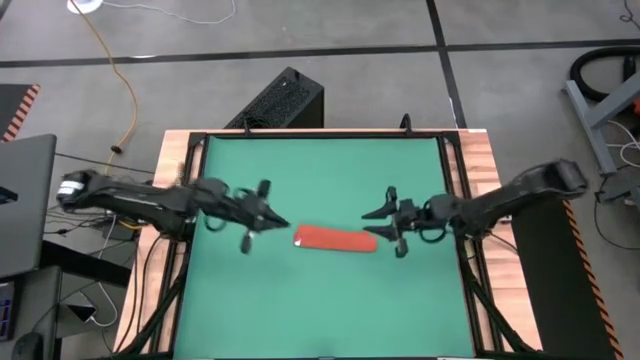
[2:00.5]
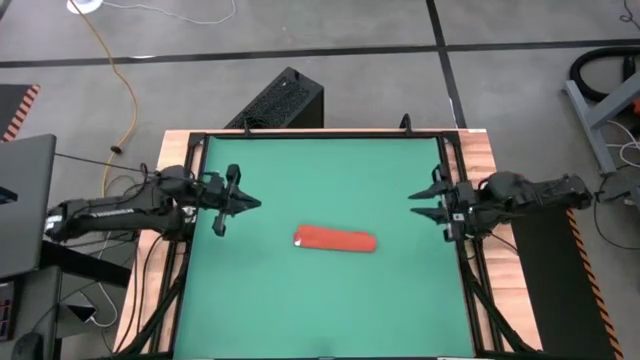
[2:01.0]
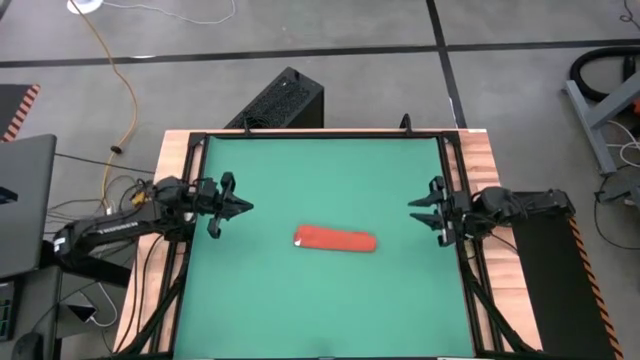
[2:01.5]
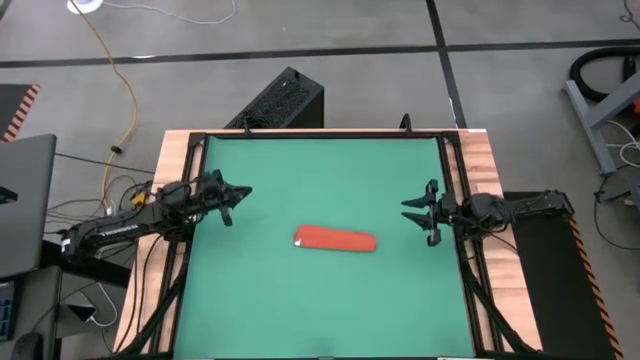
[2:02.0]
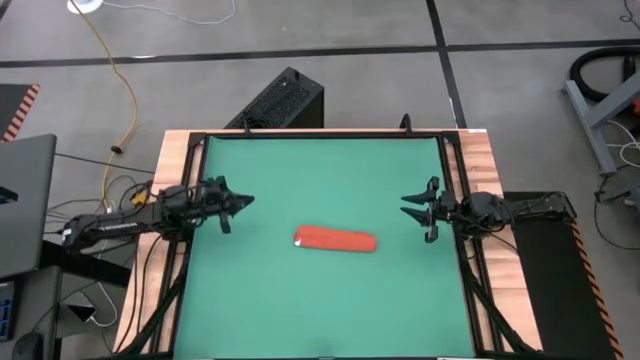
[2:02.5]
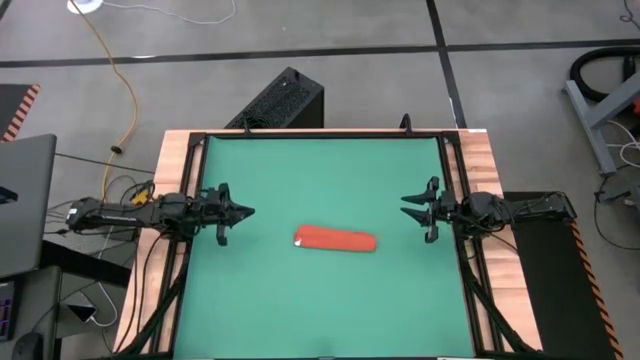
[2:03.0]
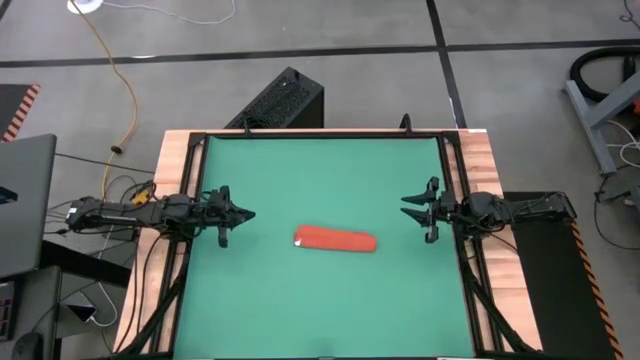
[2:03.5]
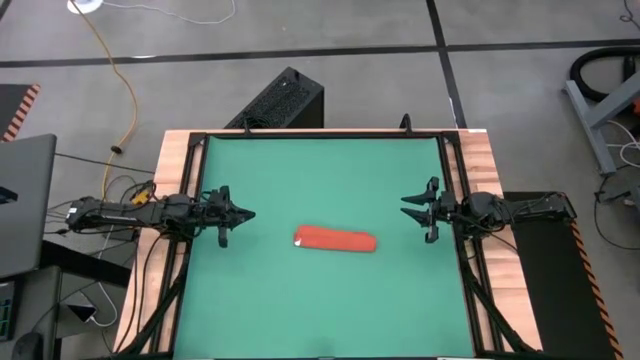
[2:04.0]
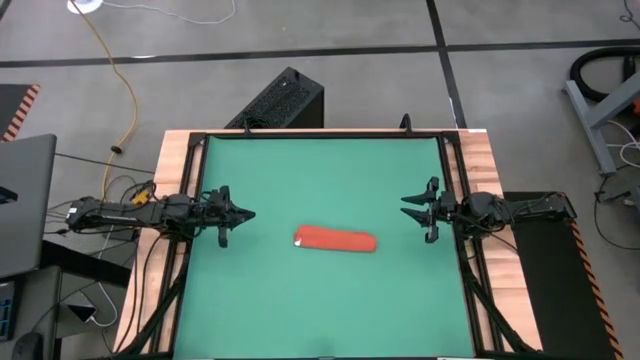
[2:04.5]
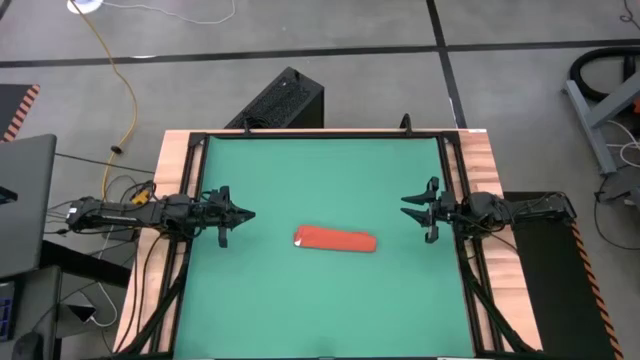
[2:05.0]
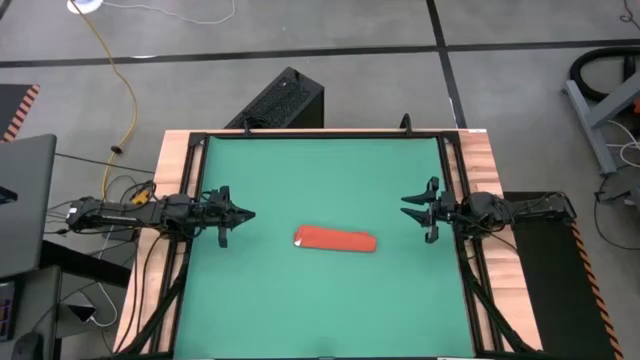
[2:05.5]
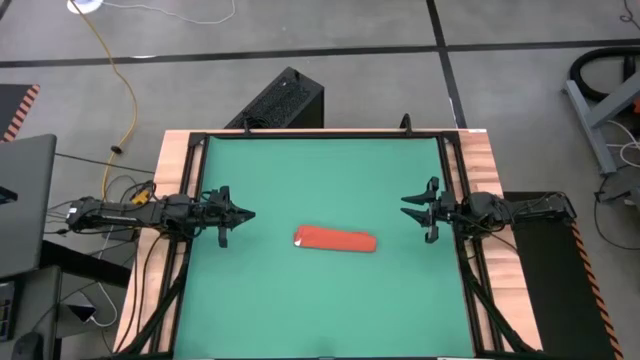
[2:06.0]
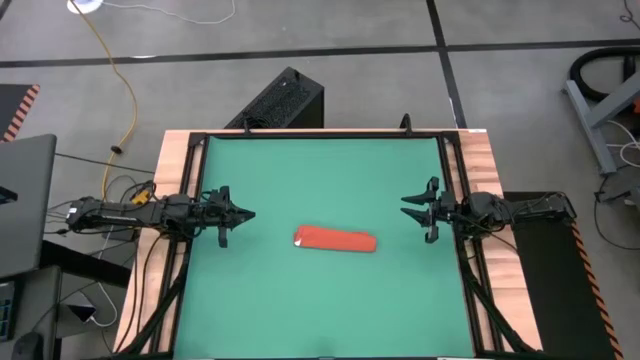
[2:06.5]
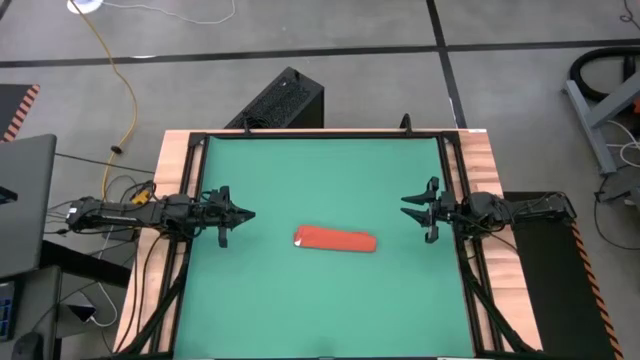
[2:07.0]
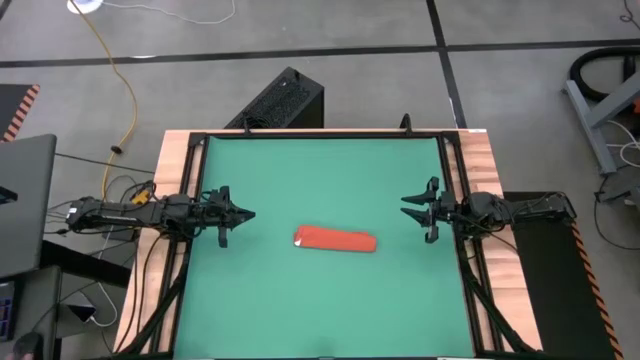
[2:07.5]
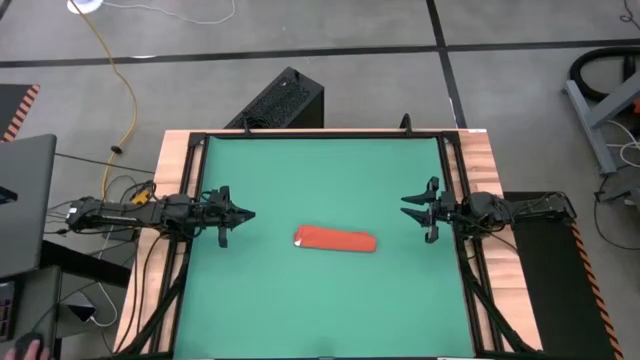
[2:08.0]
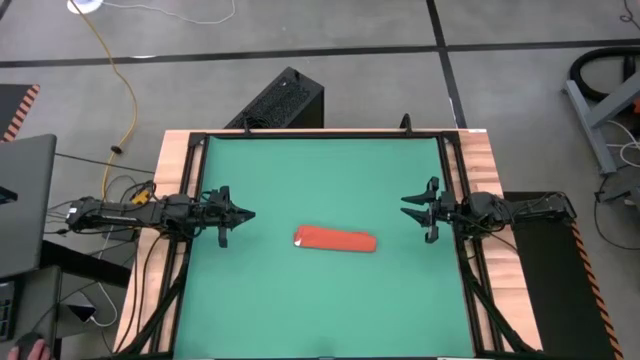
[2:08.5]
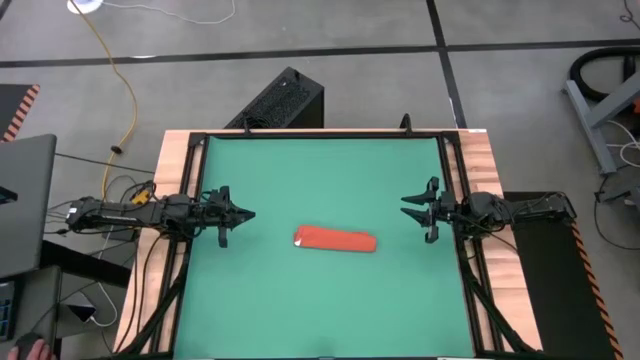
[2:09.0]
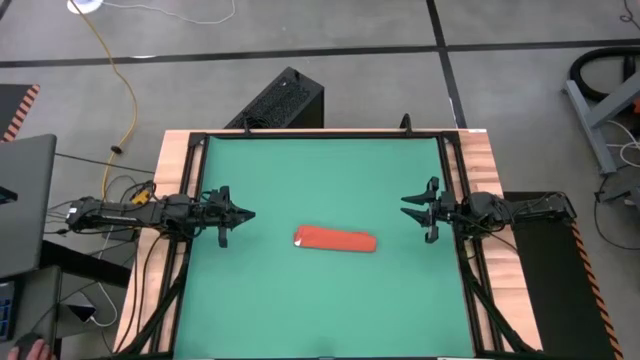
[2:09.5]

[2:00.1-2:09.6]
Task: Roll towel
Return to Home Position

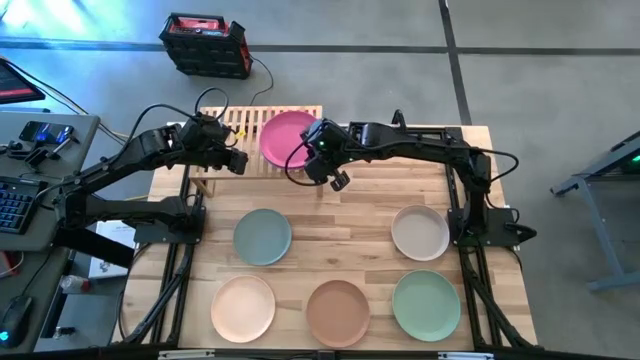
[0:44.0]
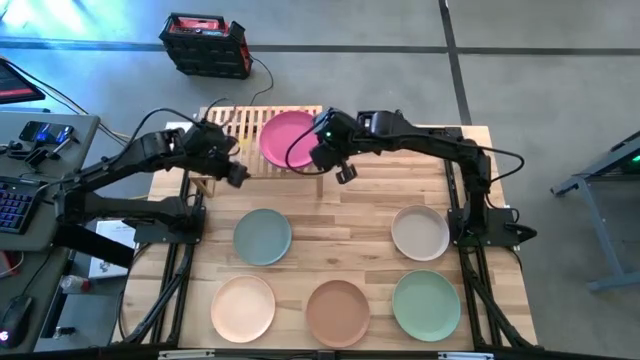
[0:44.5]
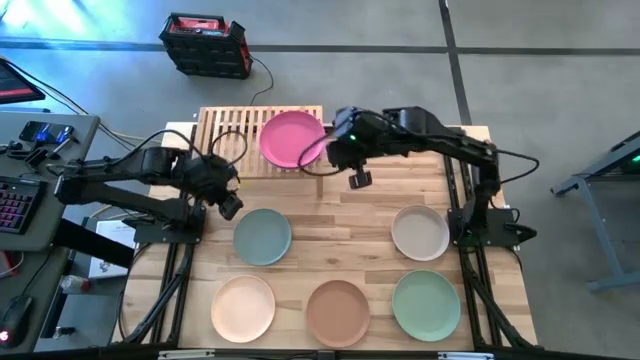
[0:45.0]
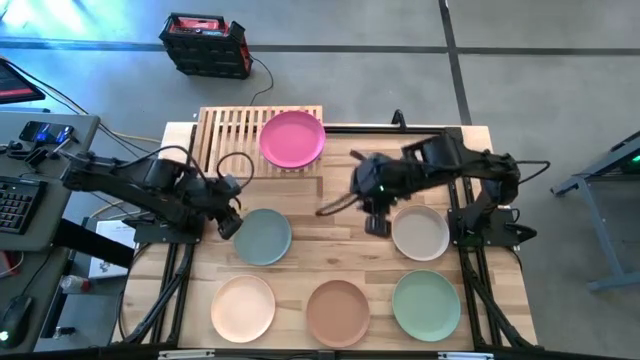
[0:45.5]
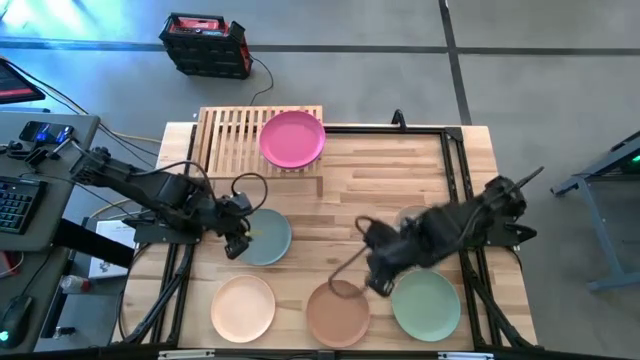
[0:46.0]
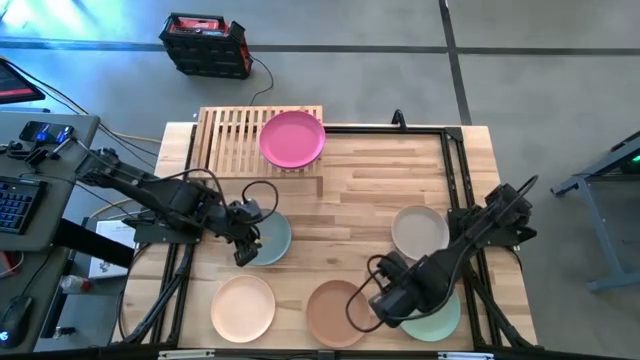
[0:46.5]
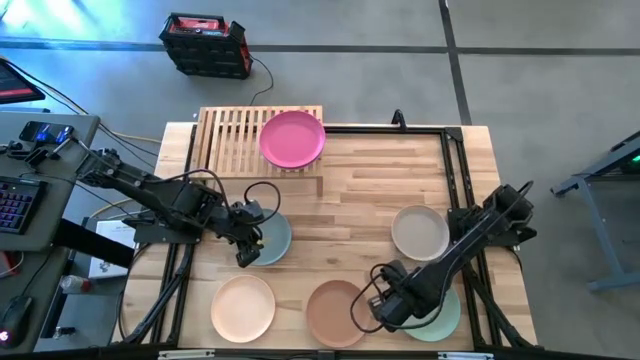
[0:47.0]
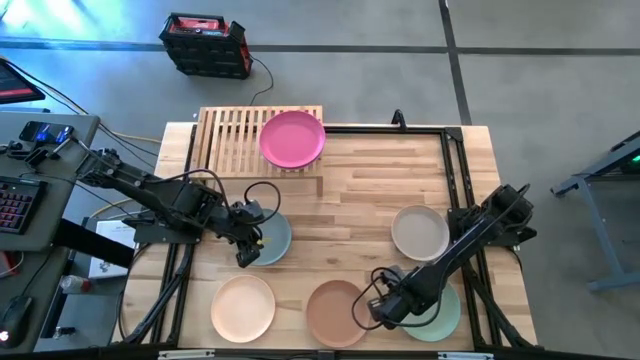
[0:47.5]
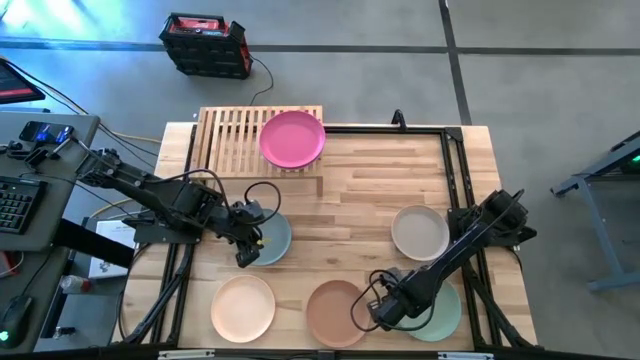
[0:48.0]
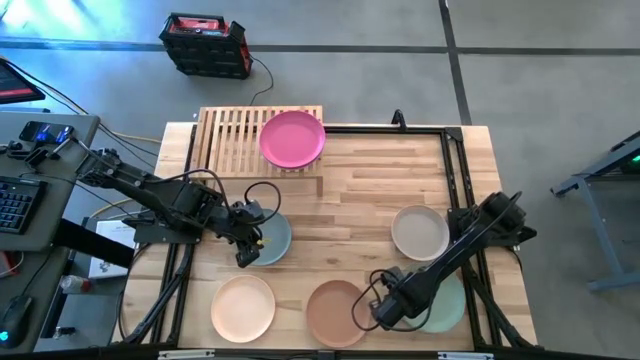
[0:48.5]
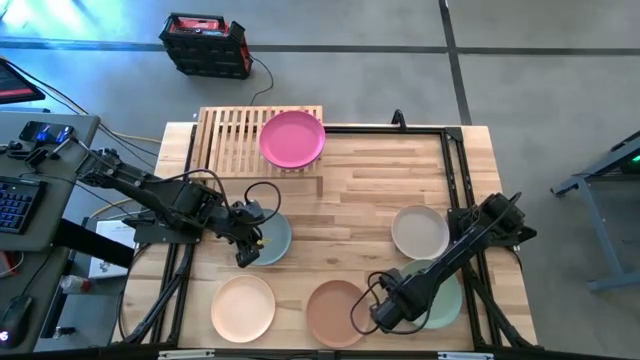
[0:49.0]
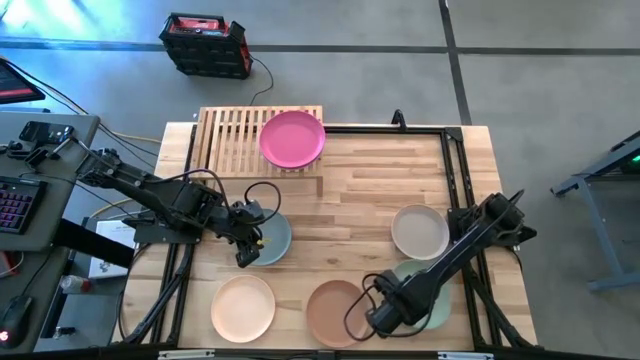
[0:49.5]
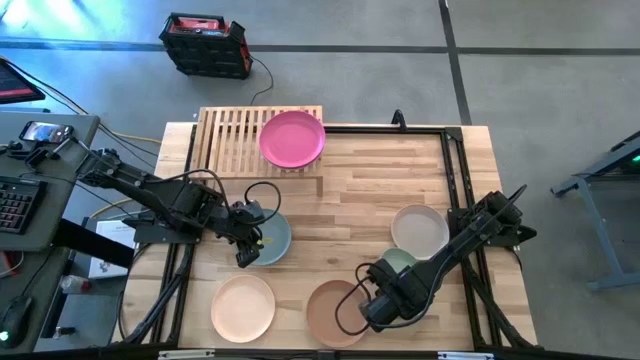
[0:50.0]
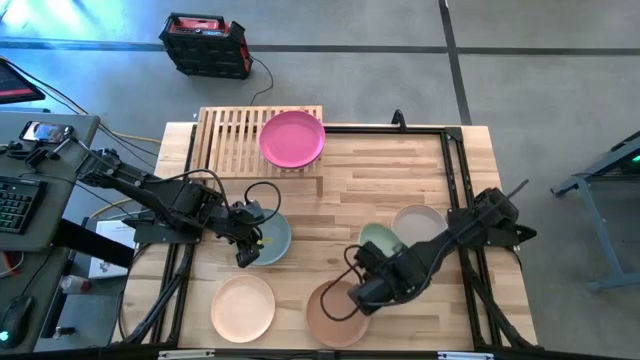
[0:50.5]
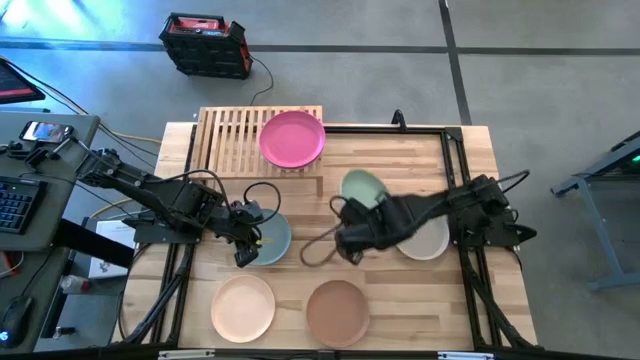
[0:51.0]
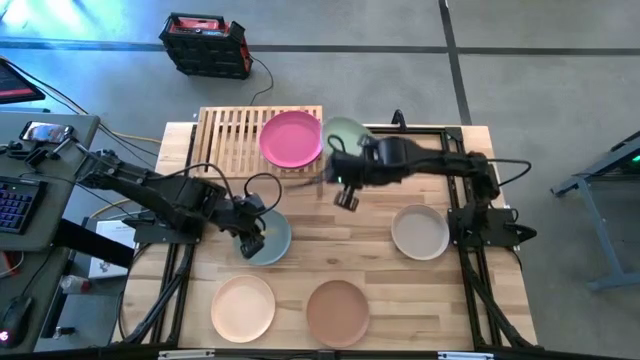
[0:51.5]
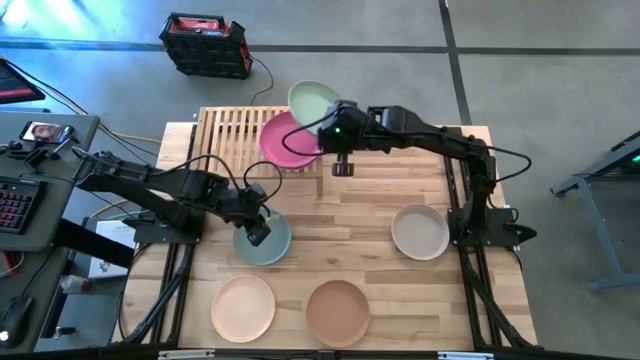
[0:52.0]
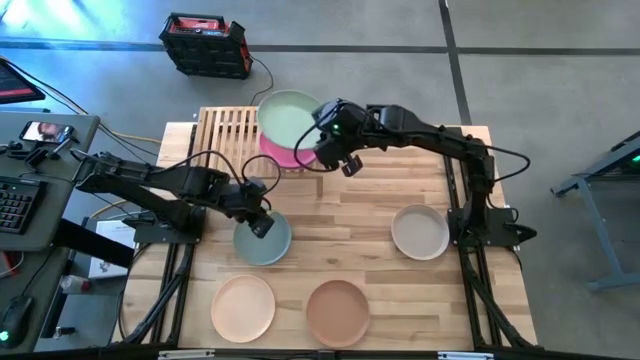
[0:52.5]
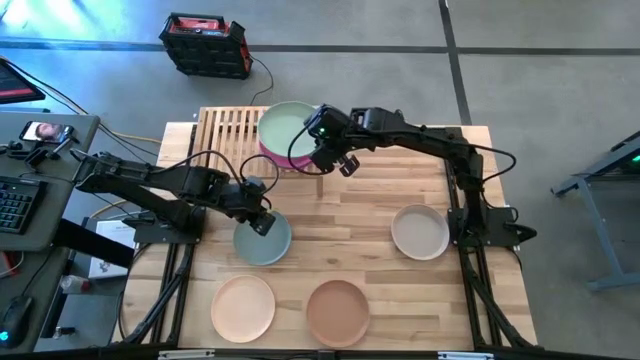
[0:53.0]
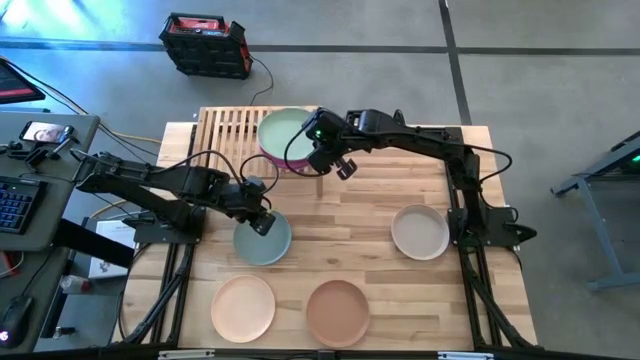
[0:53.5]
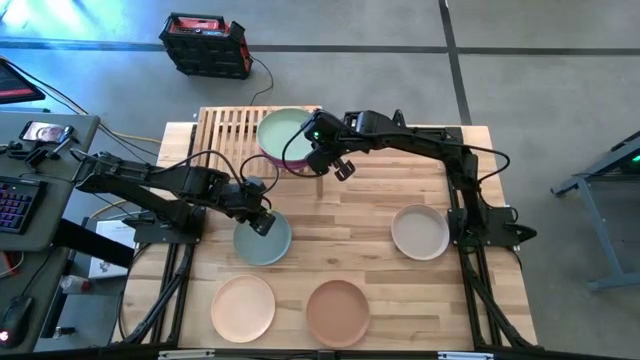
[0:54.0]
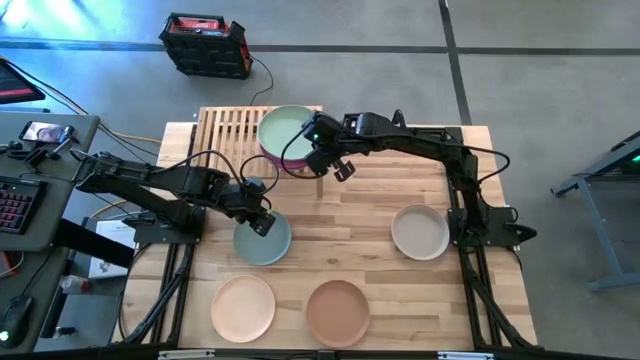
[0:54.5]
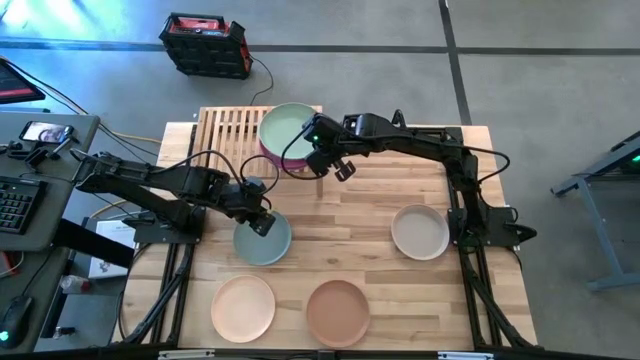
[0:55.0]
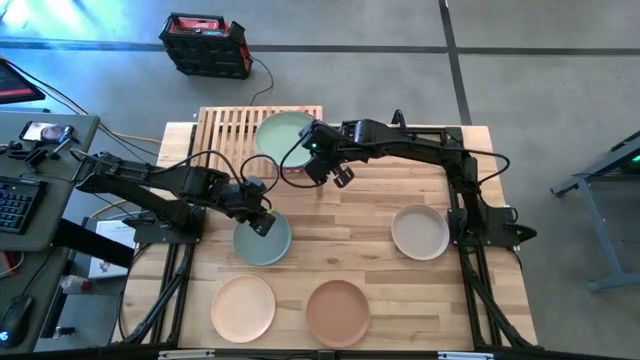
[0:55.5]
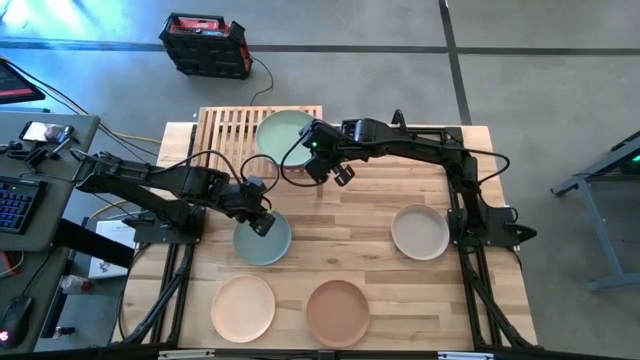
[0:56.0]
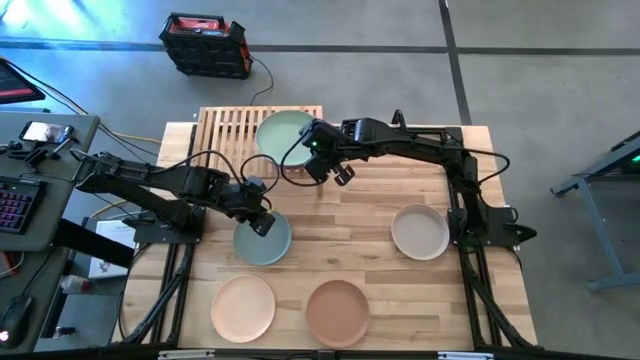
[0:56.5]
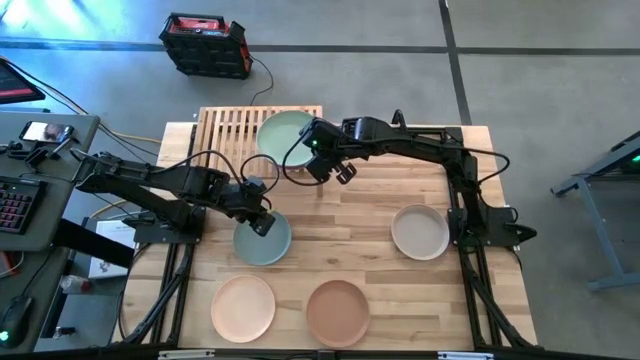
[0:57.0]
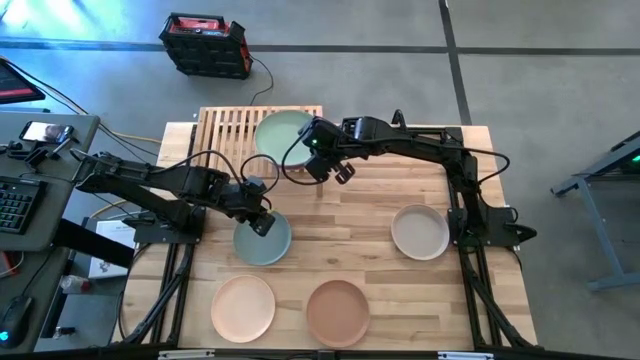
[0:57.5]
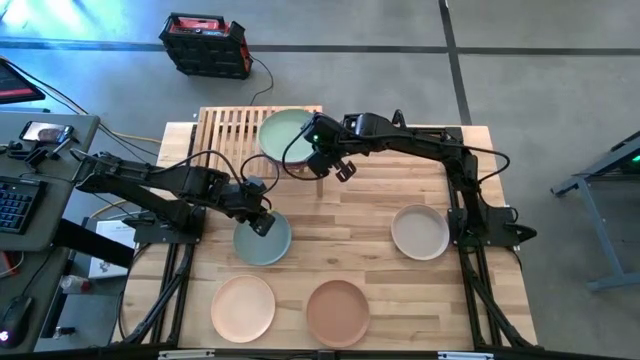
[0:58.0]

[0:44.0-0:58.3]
Task: Place and stack plates onto a shelf
Stack the green plate on top of the pink plate on the shelf
